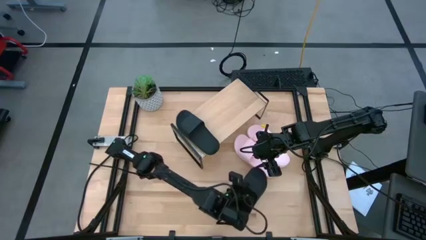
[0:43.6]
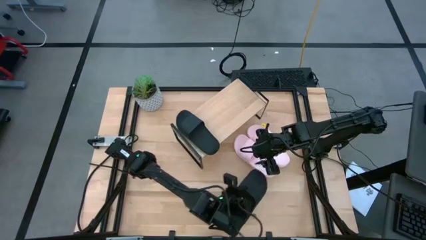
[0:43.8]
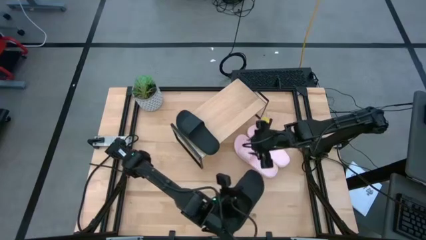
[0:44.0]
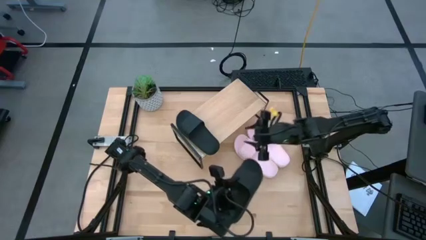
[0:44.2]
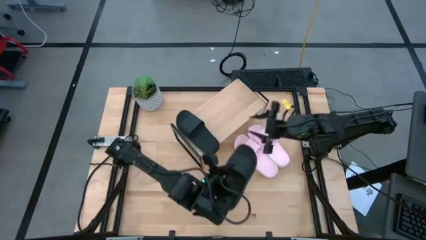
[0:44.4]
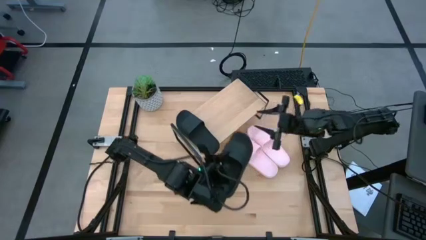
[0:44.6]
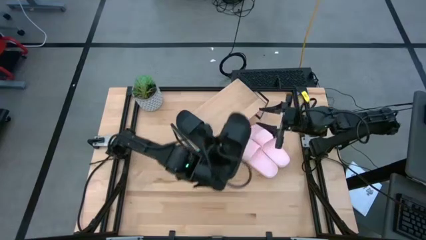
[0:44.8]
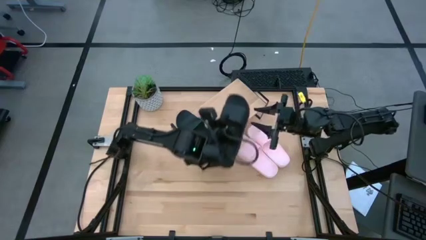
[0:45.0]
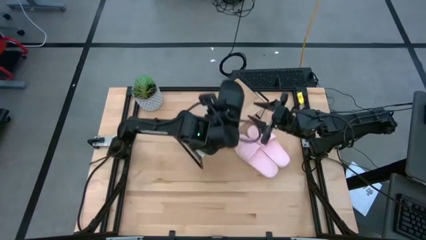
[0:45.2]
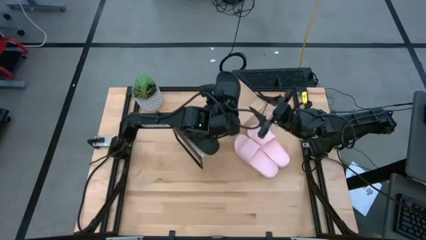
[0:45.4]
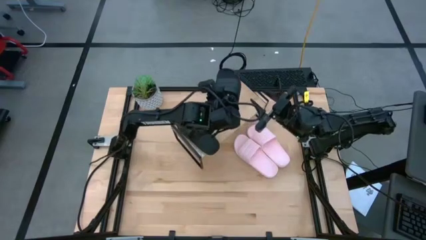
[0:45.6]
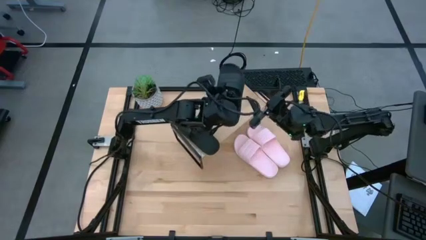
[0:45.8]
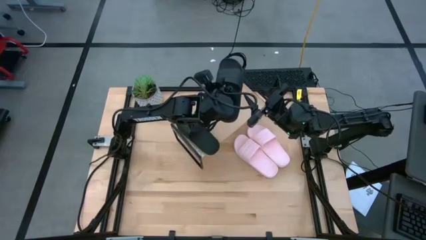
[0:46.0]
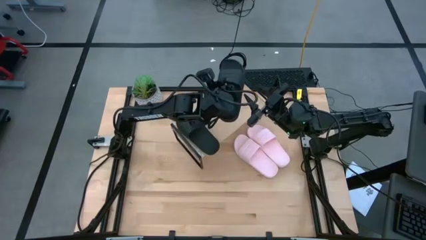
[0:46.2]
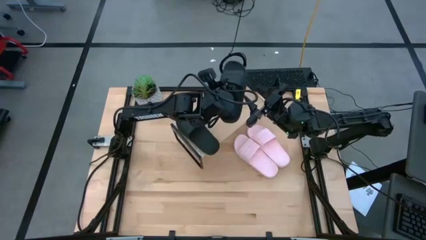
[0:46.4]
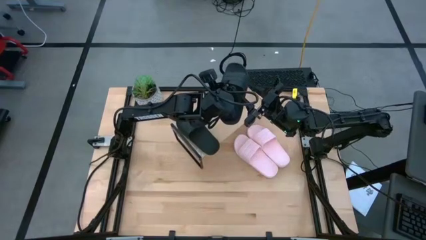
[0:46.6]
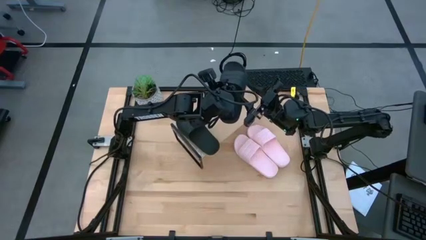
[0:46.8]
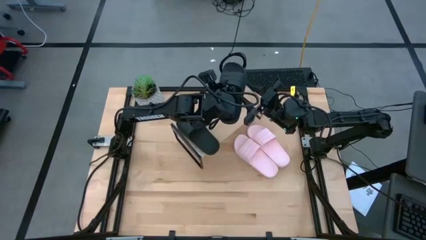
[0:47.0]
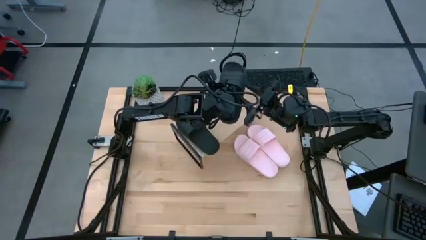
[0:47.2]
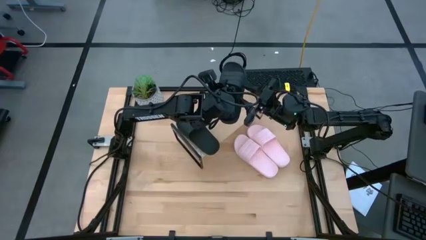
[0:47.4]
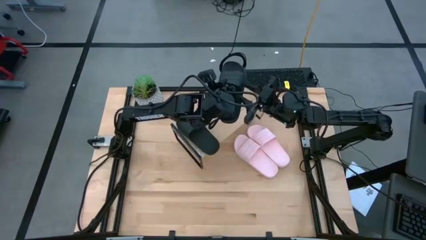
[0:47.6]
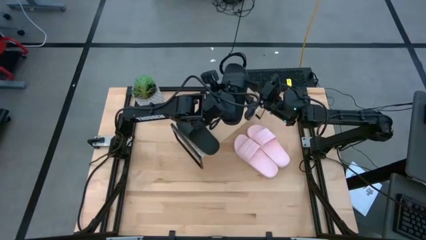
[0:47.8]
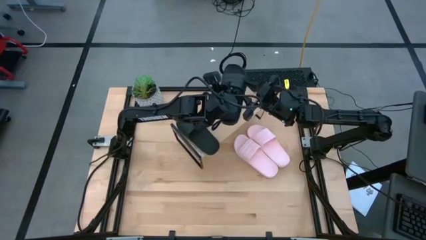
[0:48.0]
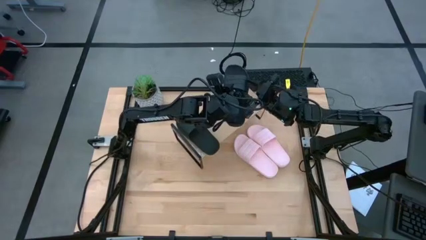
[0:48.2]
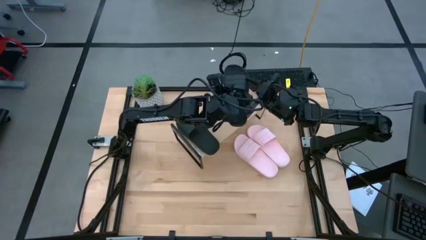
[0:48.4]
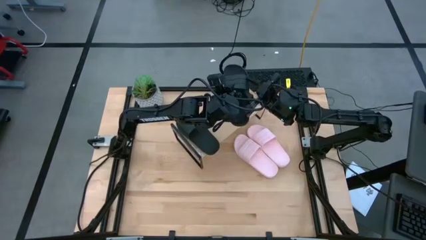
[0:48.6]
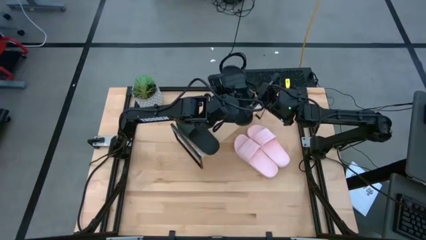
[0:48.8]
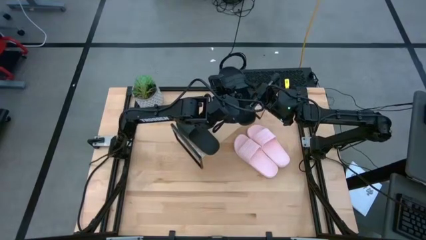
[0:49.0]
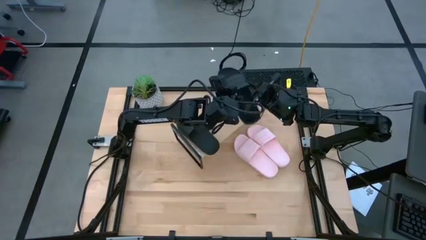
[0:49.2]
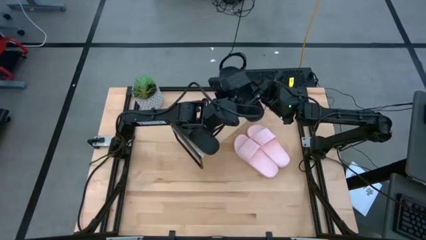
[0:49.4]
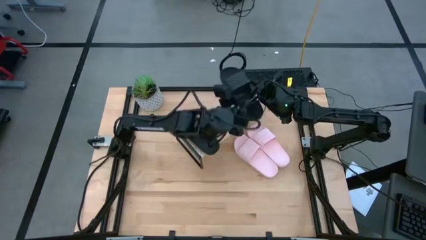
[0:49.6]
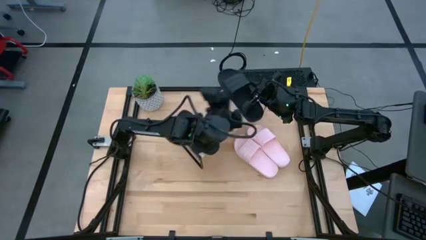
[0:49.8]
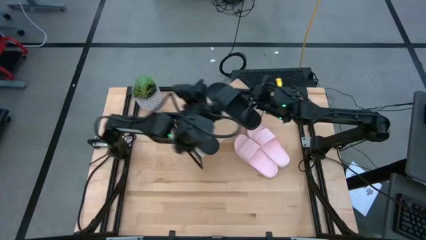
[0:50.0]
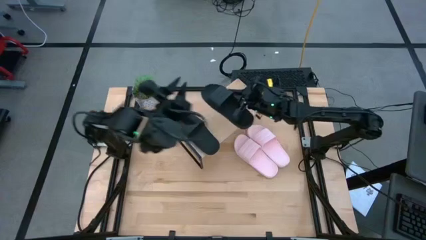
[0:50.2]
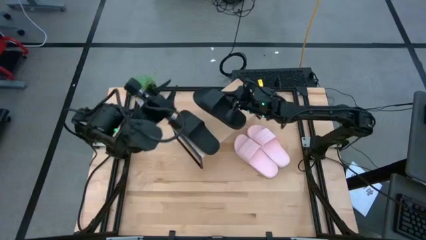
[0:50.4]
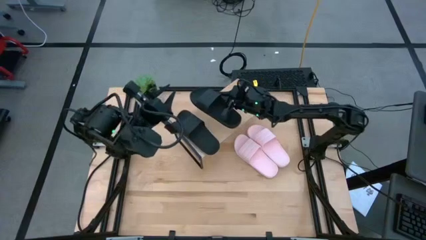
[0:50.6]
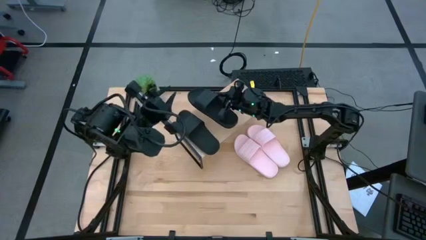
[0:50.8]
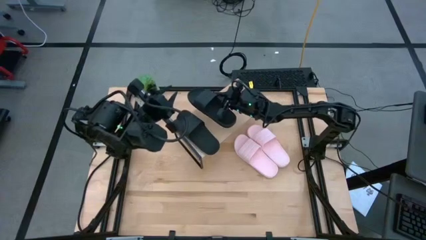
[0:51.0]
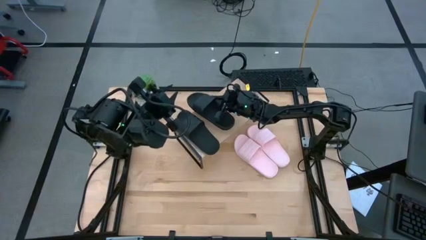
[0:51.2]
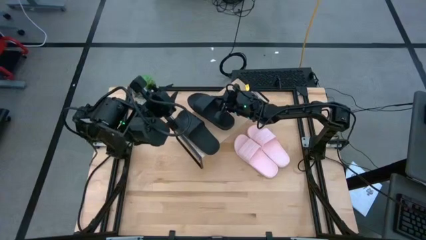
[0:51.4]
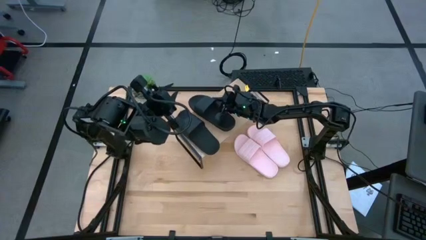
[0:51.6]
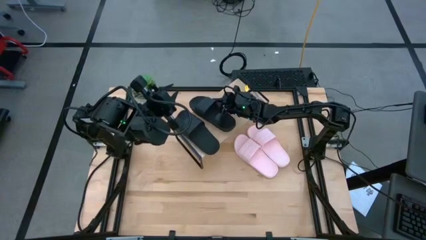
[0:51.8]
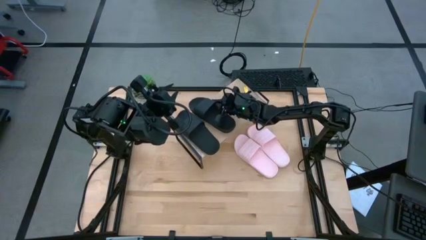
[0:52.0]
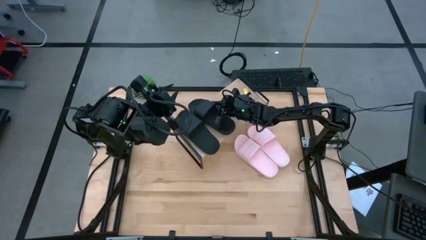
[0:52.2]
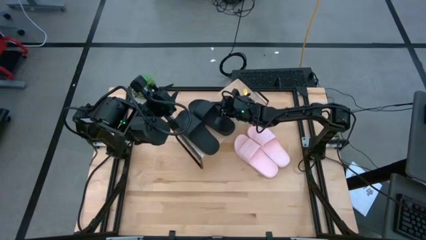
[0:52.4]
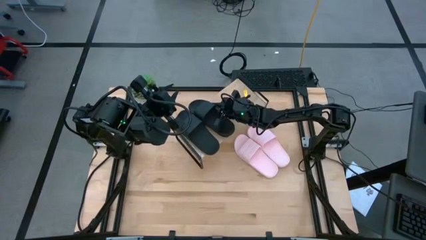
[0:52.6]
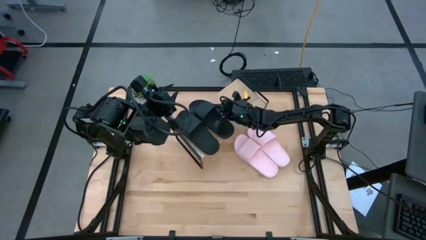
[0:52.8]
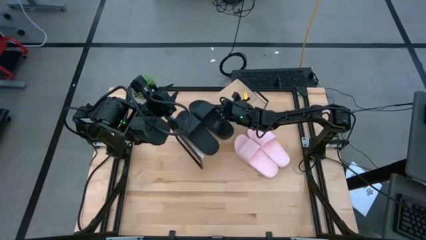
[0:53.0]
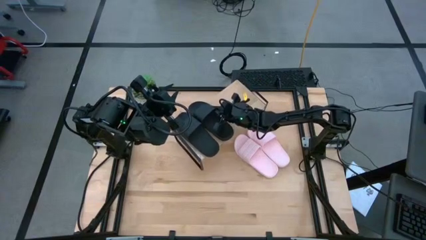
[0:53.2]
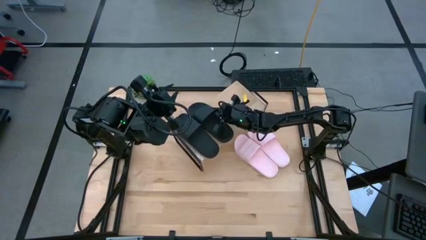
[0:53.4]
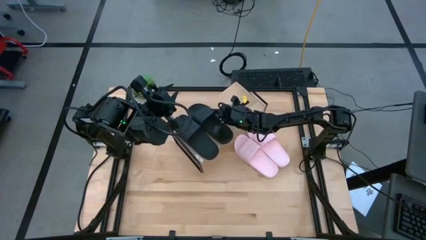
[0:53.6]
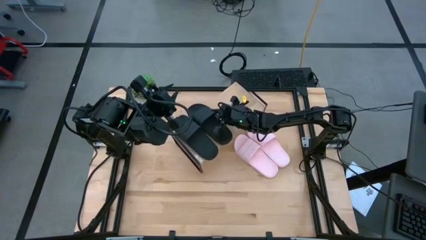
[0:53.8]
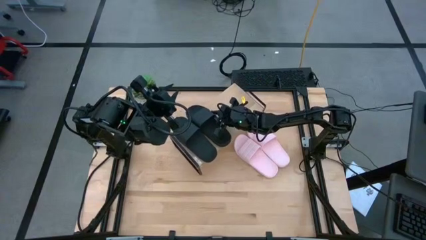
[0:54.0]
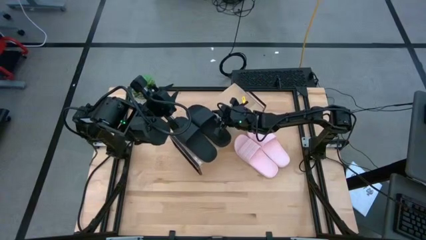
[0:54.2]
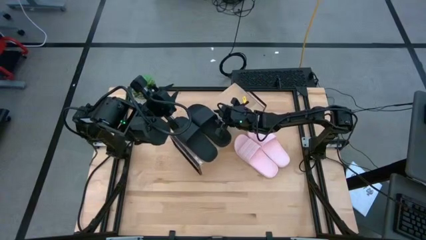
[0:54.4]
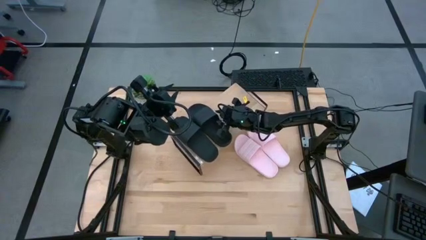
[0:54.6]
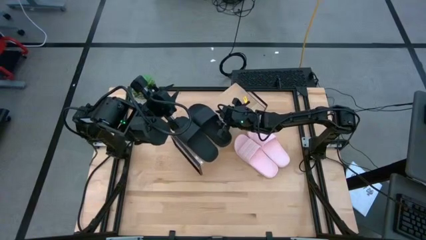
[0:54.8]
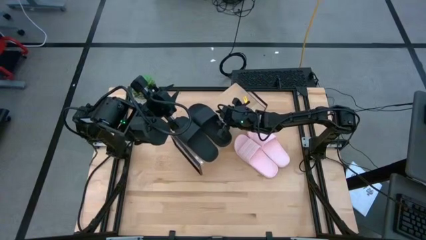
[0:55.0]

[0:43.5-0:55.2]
Task: Pick and place slides into the shelf
Put the black slide on the shelf
